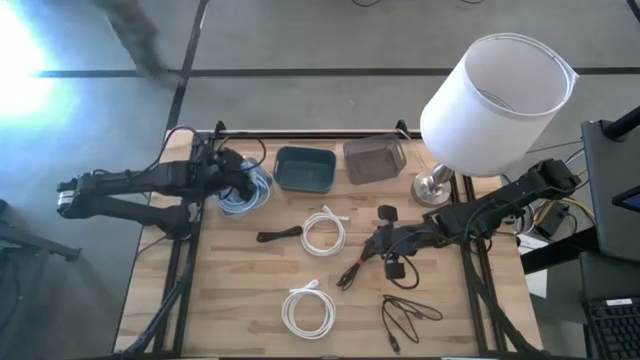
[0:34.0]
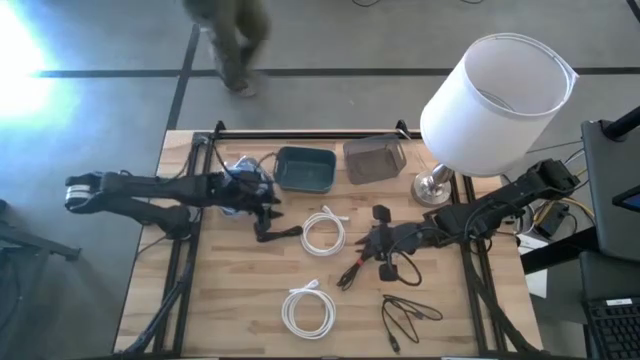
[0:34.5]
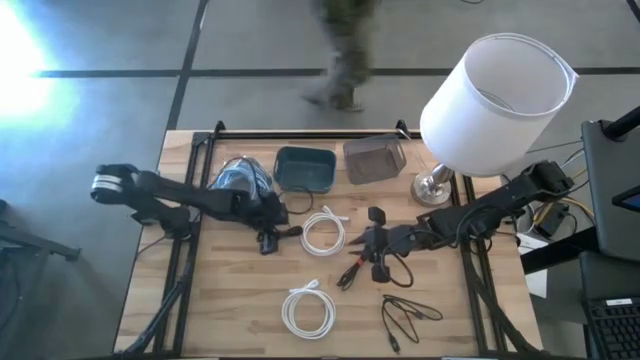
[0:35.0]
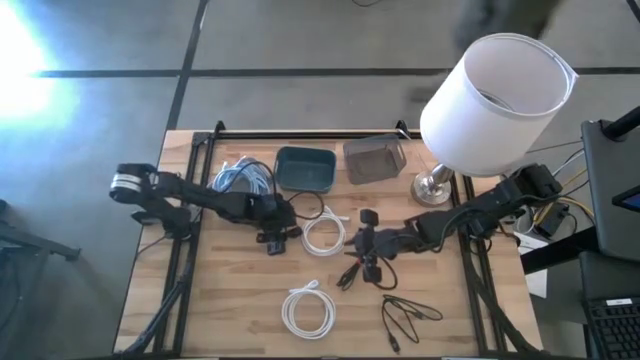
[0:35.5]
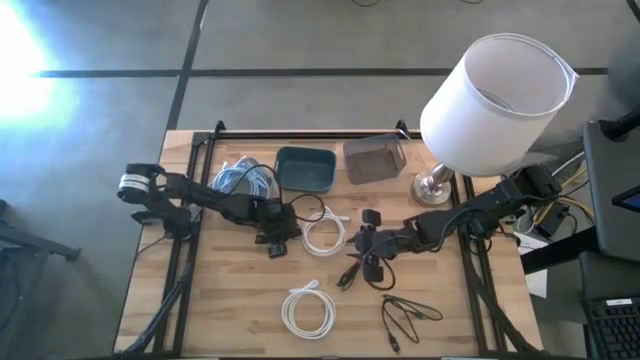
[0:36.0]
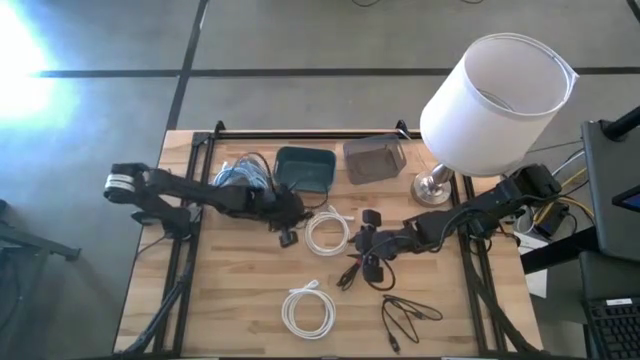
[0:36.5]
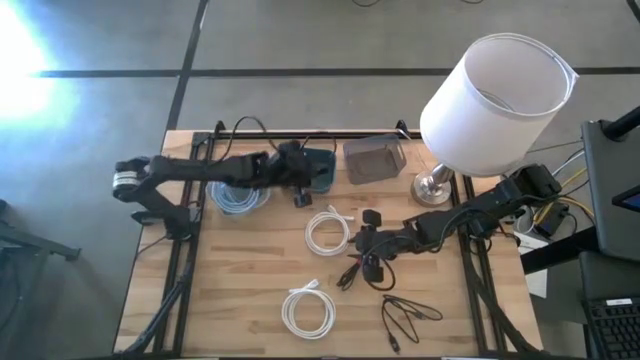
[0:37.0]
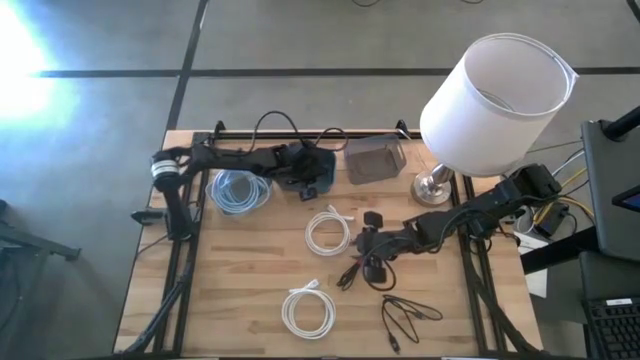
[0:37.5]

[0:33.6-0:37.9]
Task: Pick & Place USB Port
Put the left black charger cable into the blue bin

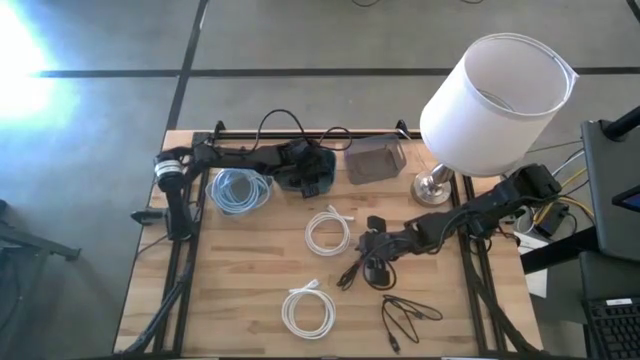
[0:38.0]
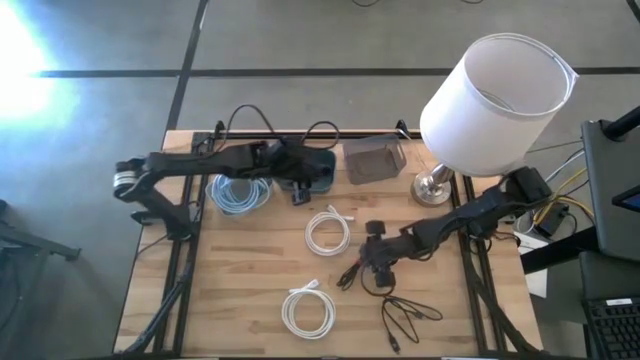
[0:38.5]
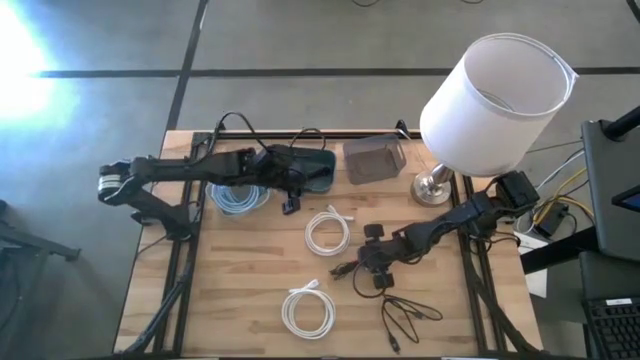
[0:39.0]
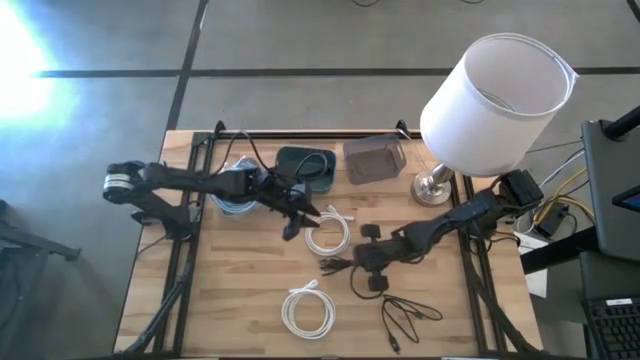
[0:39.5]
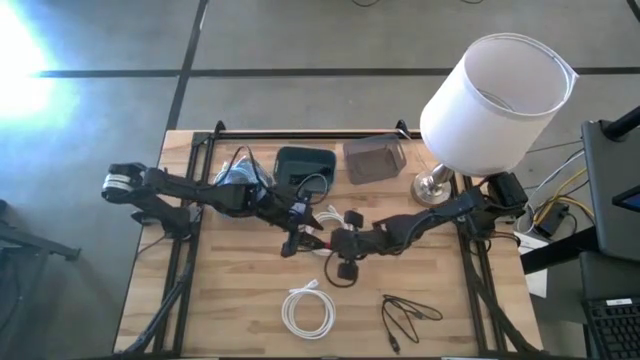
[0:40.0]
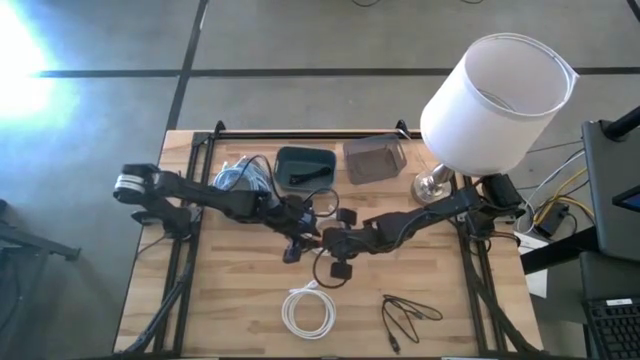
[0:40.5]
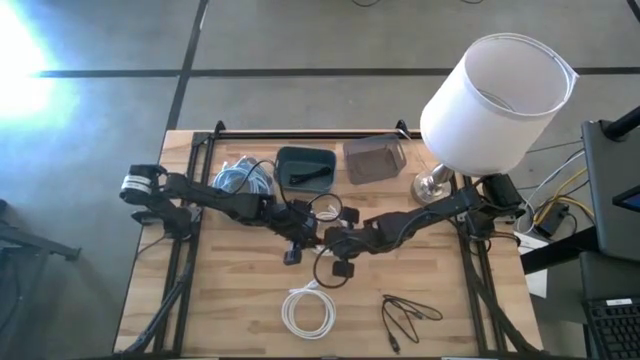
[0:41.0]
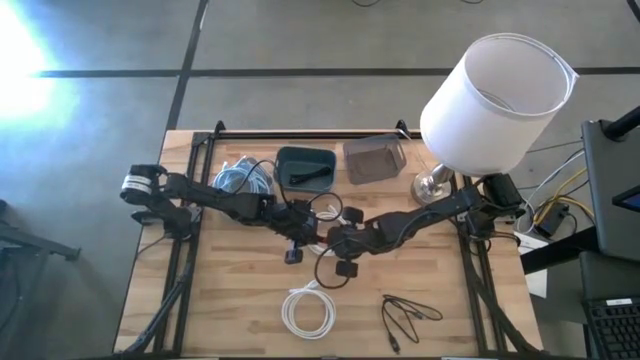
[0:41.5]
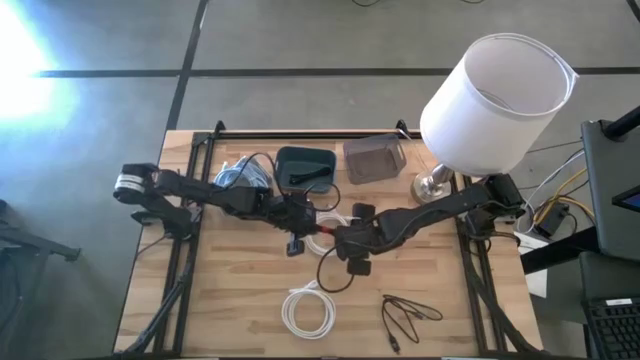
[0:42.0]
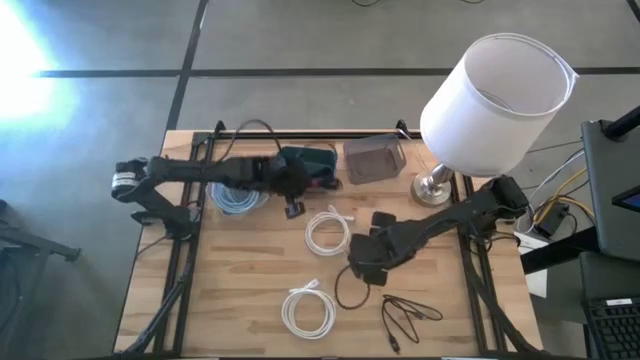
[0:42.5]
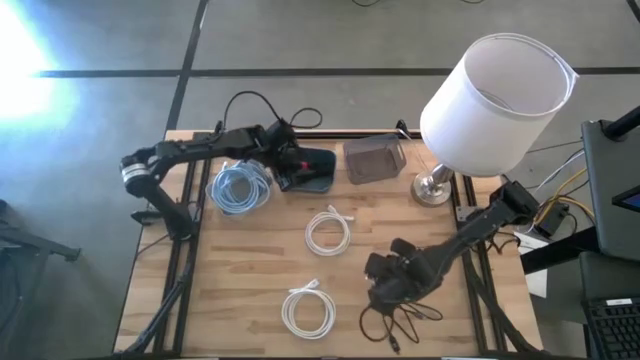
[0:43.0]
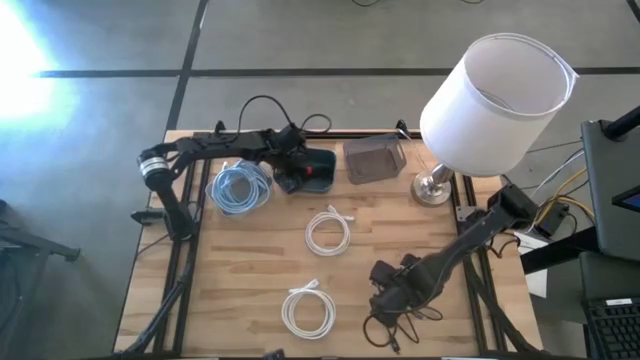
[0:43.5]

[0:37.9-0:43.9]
Put the top black charger cable into the blue bin

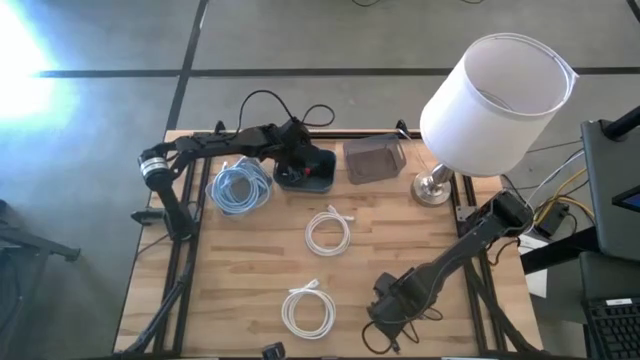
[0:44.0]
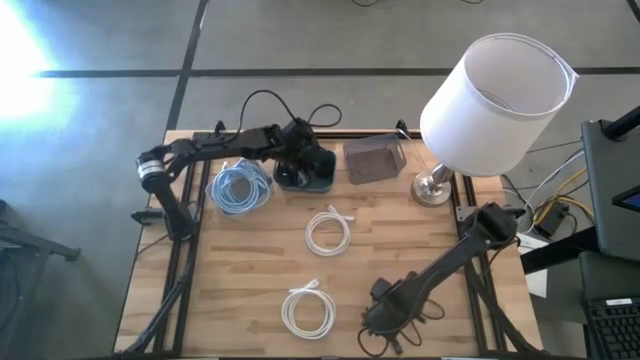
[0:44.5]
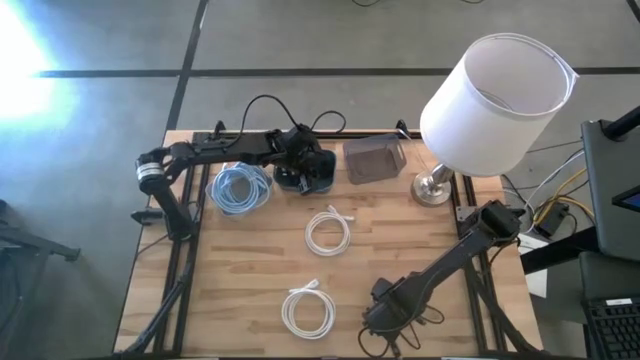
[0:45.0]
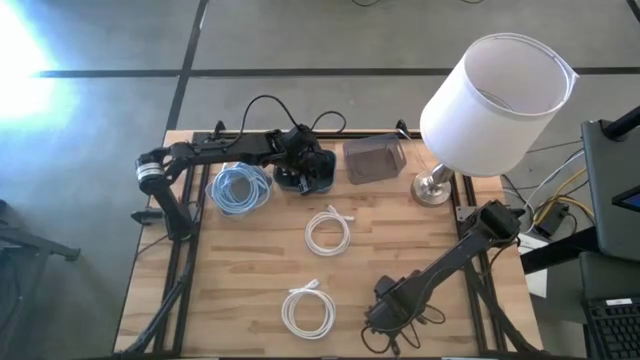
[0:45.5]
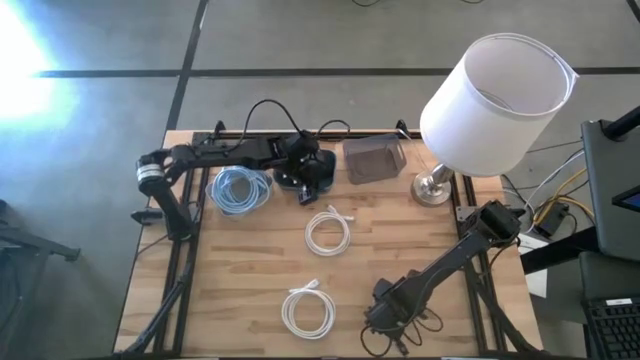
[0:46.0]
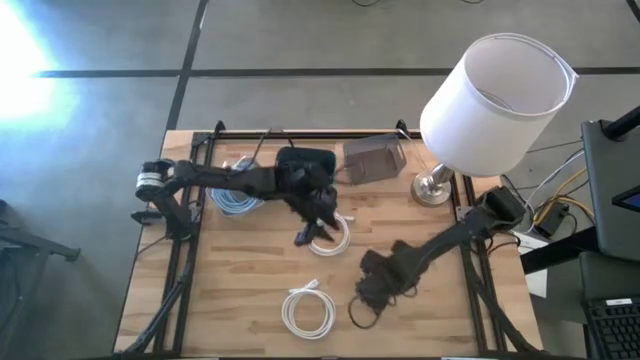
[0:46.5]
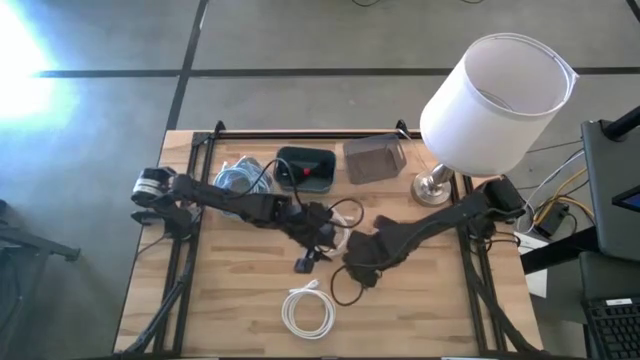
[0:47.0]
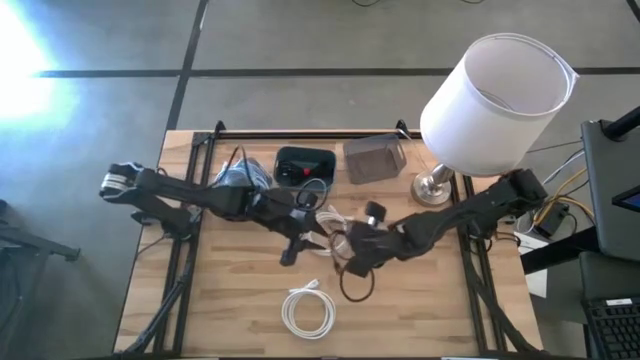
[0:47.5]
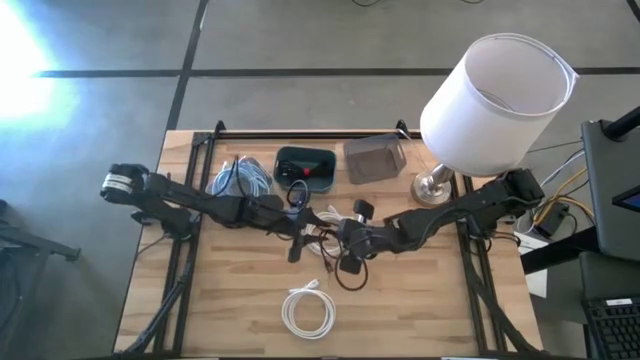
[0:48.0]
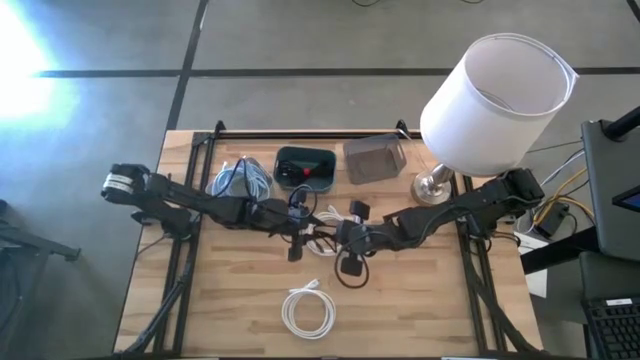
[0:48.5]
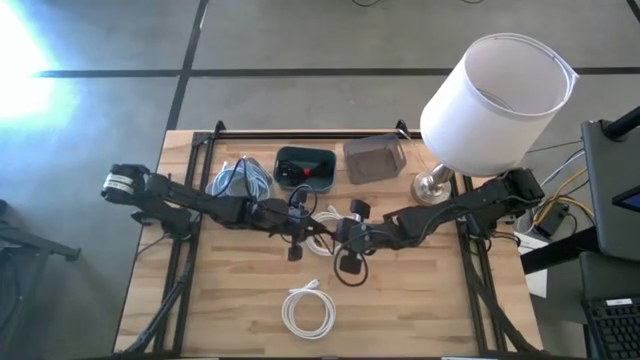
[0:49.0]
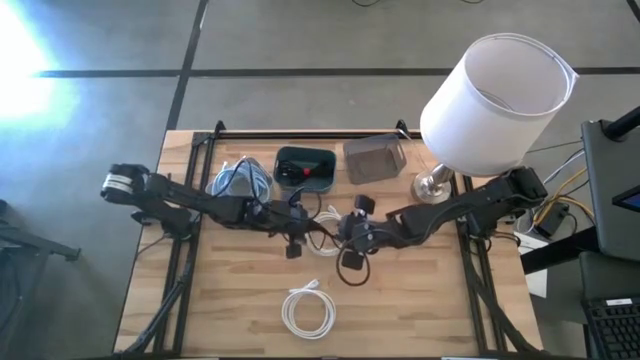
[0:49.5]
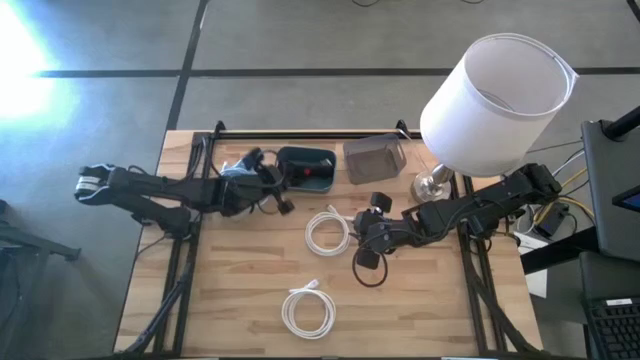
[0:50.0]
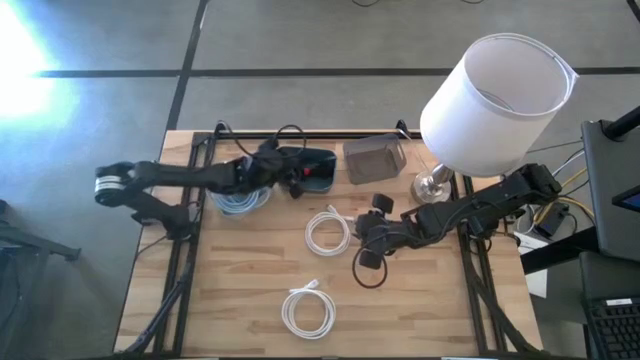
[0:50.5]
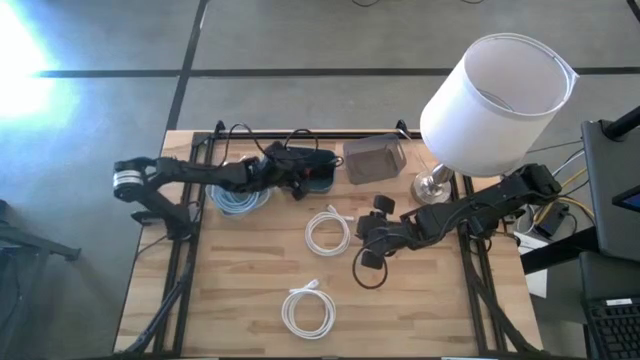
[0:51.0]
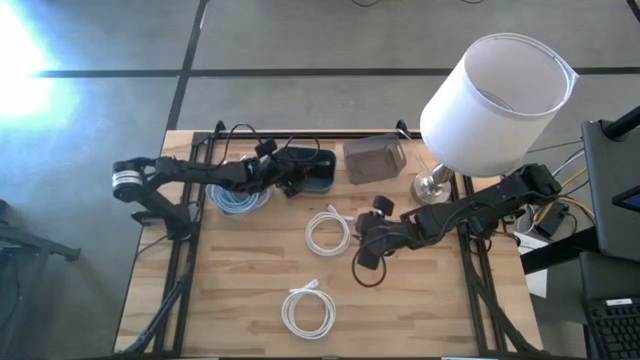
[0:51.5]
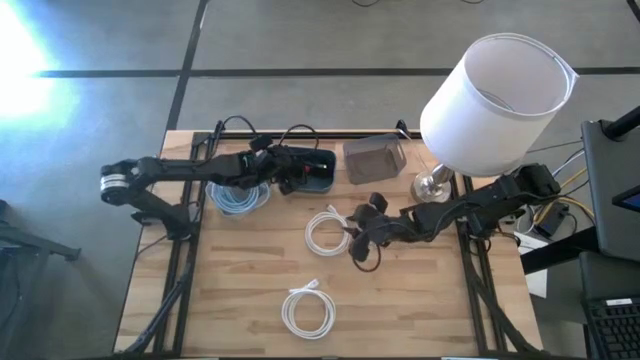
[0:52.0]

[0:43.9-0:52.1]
Put the black charger cable into the blue bin

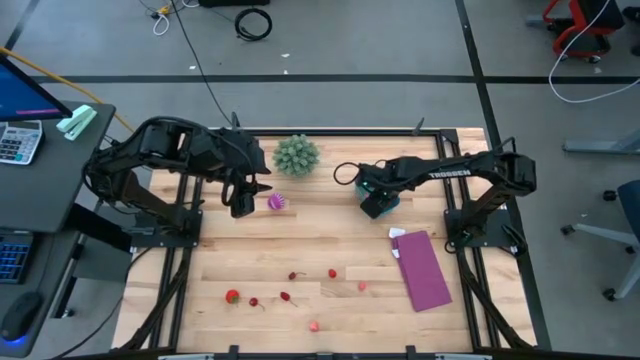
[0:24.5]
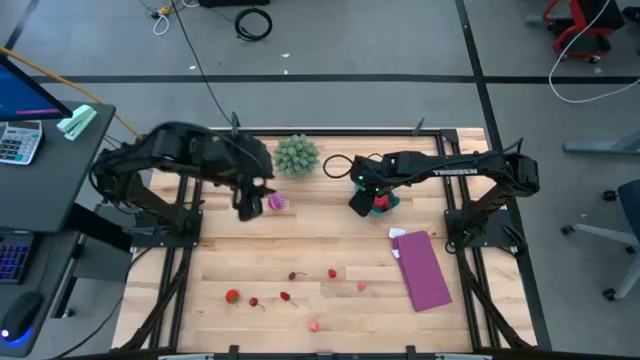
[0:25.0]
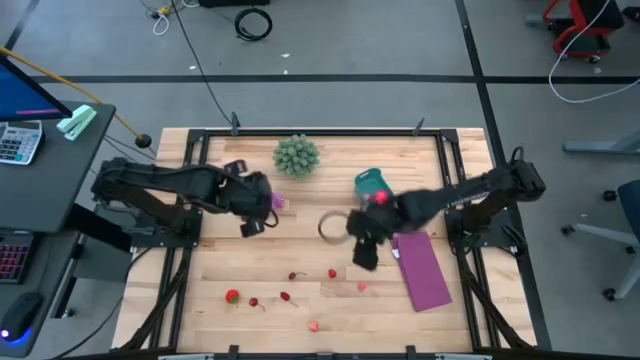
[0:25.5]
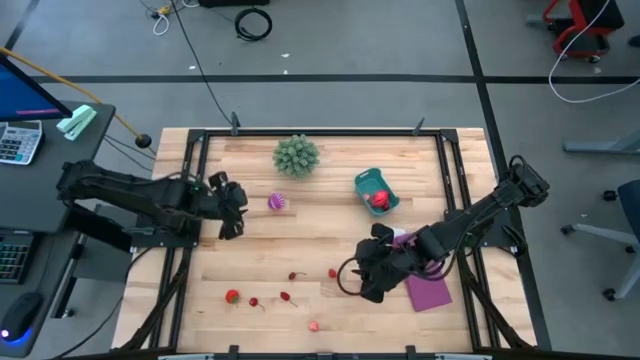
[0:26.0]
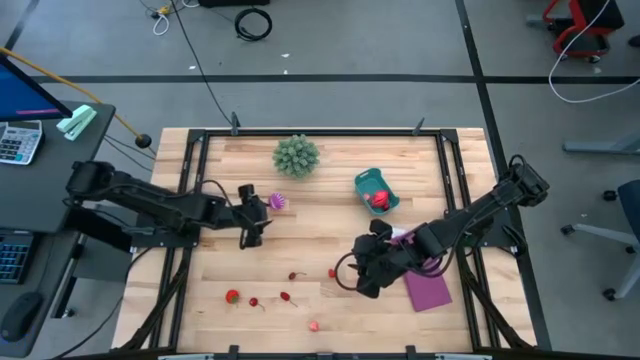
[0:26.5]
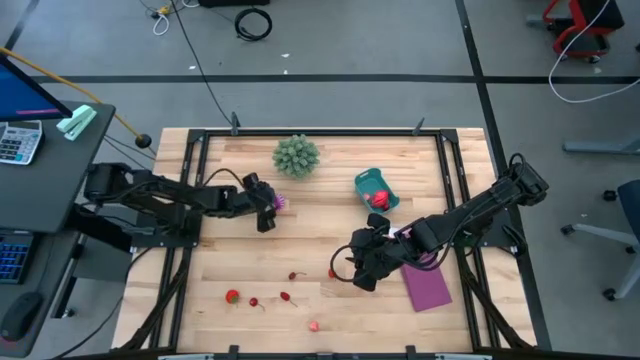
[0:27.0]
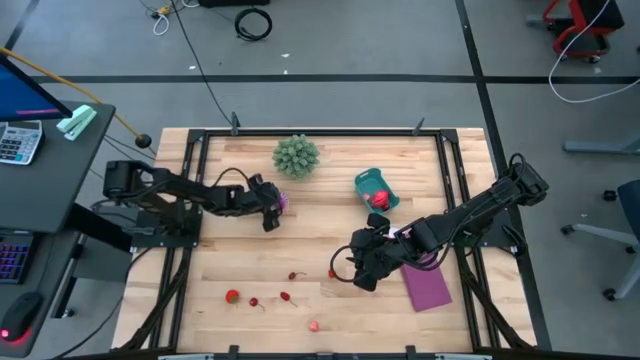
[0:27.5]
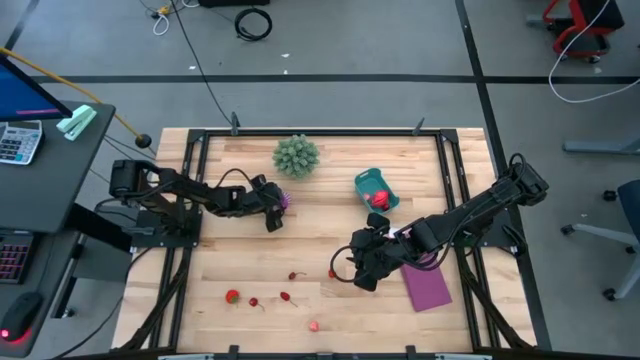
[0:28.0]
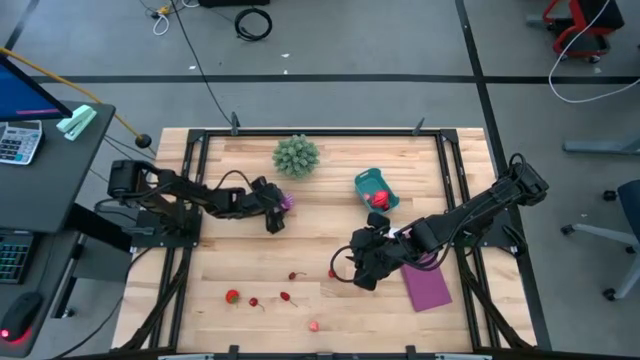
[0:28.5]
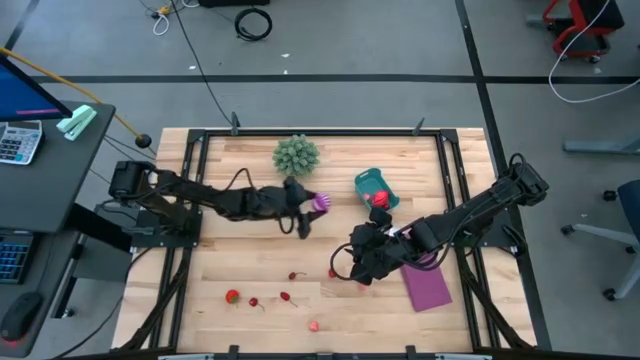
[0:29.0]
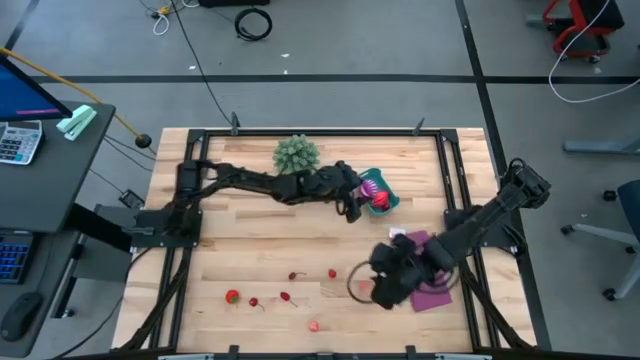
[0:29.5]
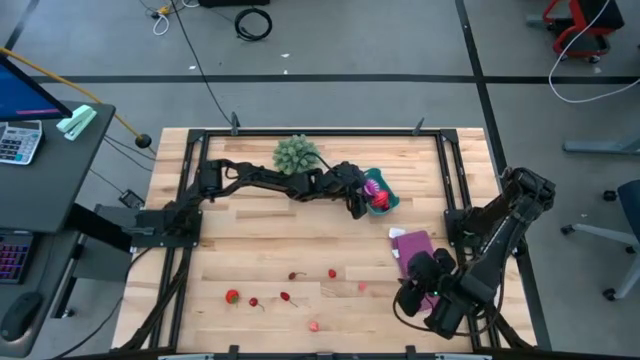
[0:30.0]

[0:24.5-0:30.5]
Task: Pick and placing Produce into tupperware
Put the violet onion into the blue bin
